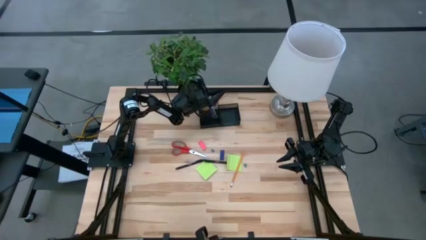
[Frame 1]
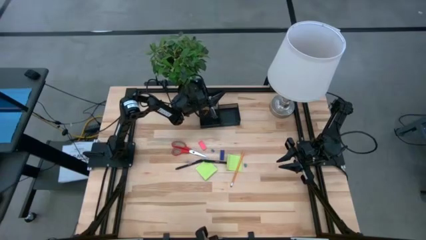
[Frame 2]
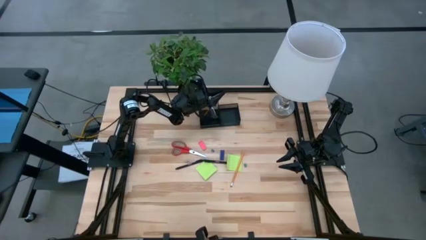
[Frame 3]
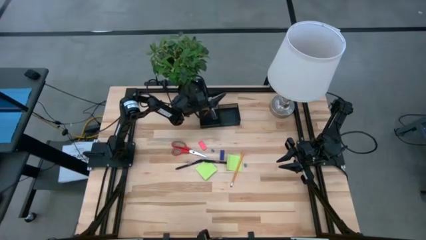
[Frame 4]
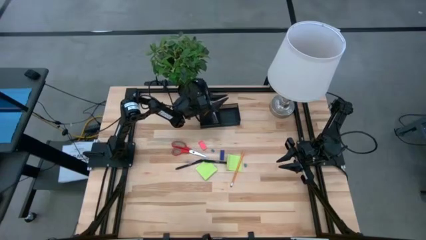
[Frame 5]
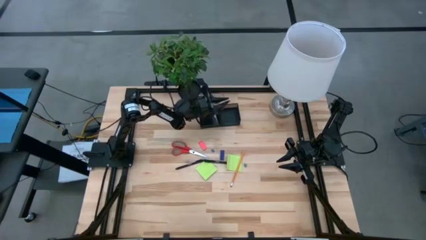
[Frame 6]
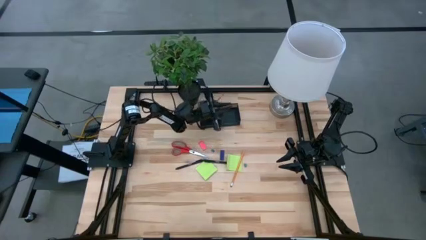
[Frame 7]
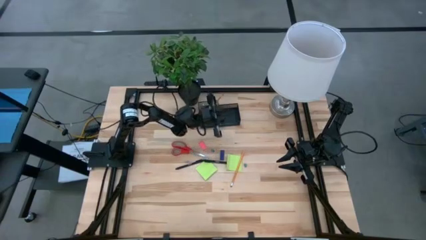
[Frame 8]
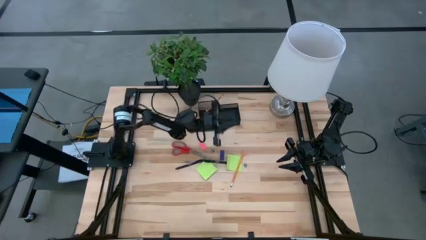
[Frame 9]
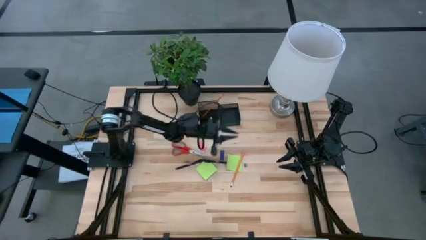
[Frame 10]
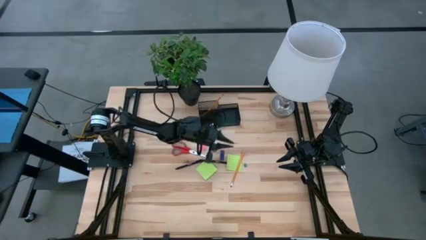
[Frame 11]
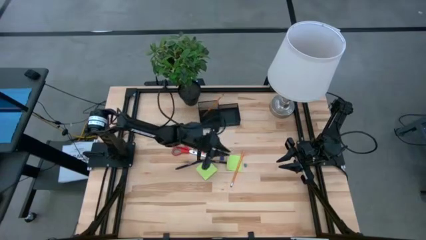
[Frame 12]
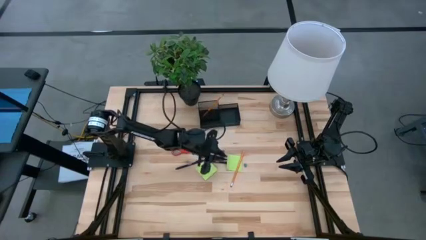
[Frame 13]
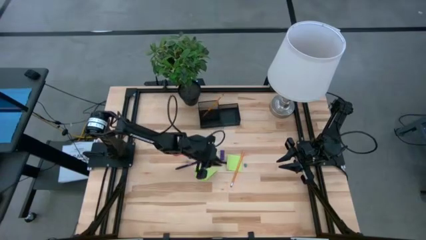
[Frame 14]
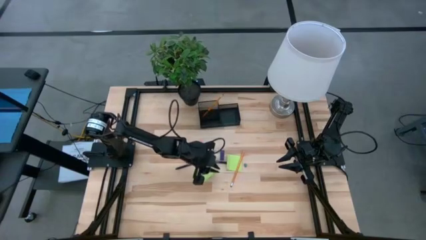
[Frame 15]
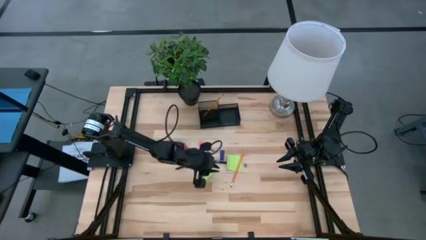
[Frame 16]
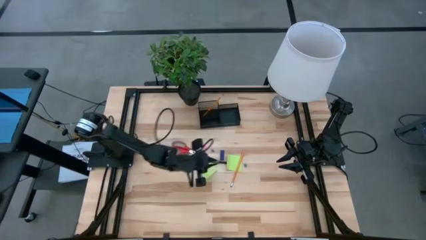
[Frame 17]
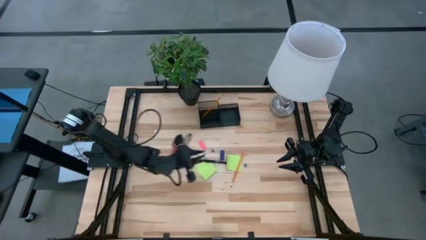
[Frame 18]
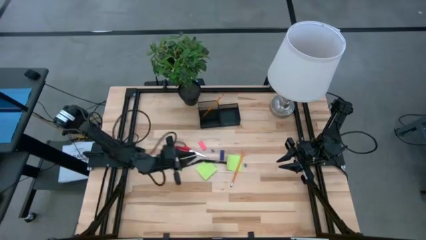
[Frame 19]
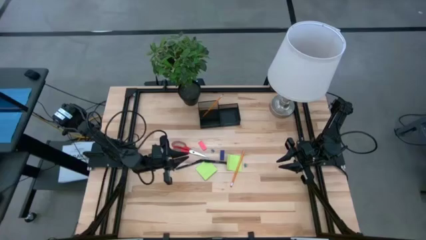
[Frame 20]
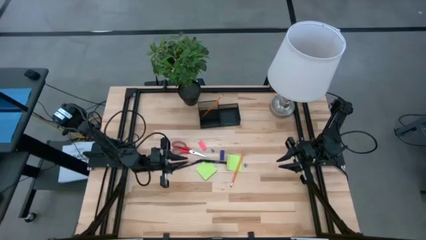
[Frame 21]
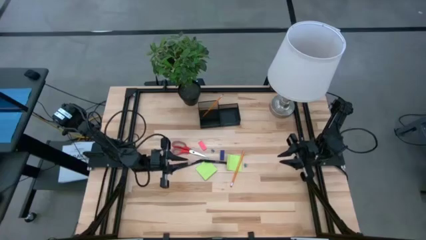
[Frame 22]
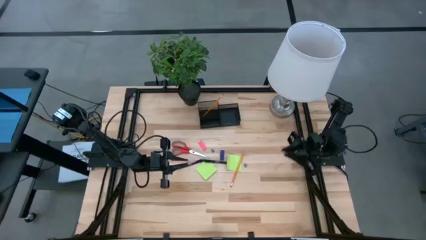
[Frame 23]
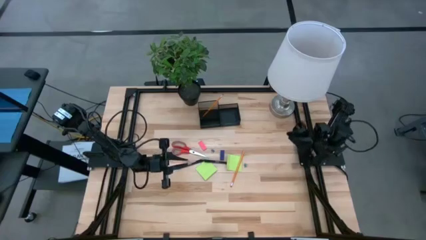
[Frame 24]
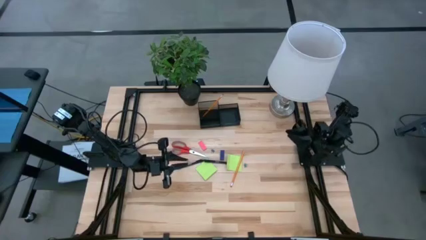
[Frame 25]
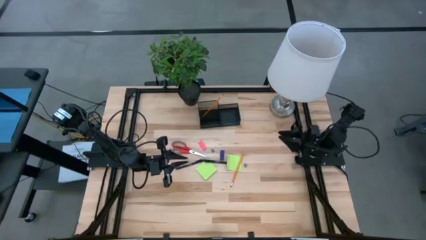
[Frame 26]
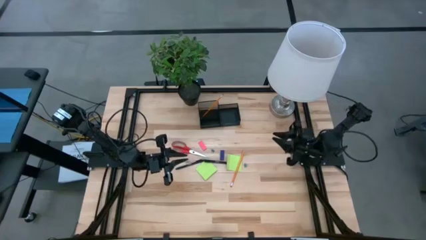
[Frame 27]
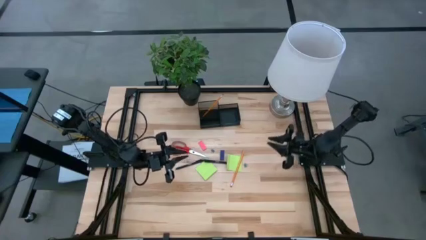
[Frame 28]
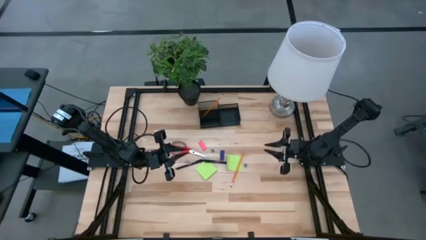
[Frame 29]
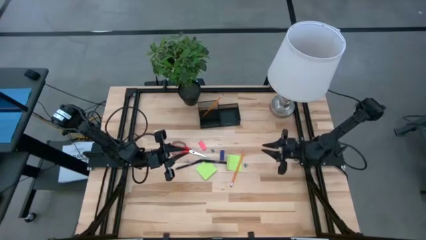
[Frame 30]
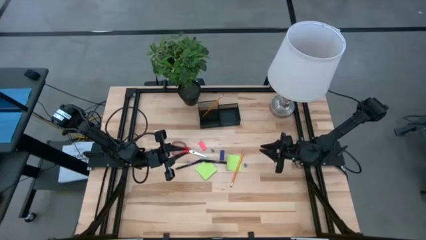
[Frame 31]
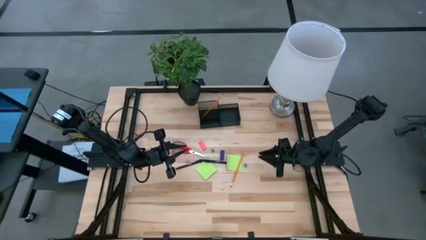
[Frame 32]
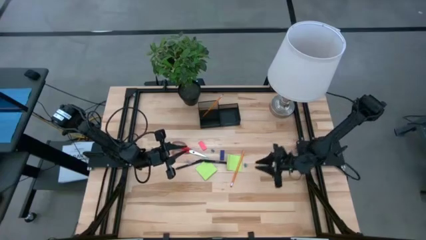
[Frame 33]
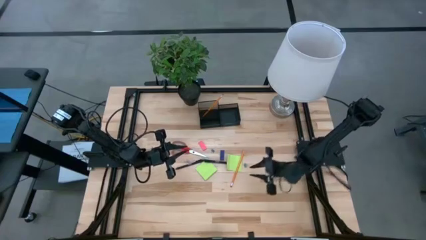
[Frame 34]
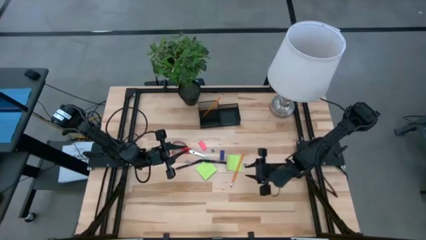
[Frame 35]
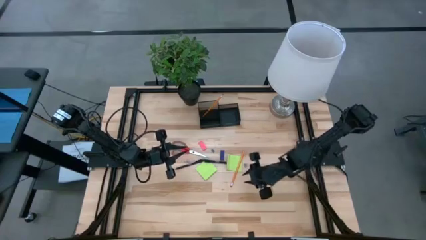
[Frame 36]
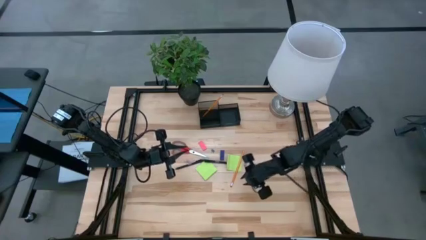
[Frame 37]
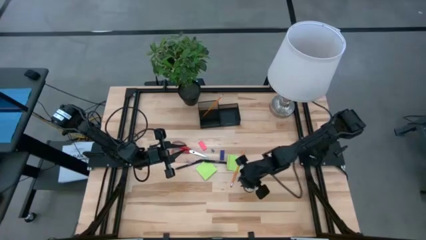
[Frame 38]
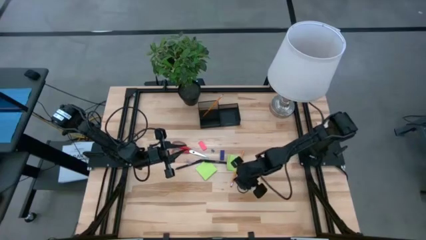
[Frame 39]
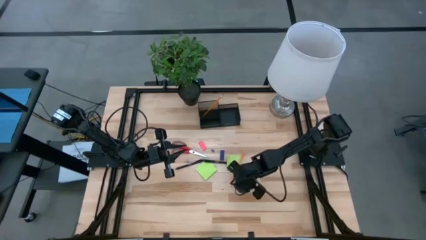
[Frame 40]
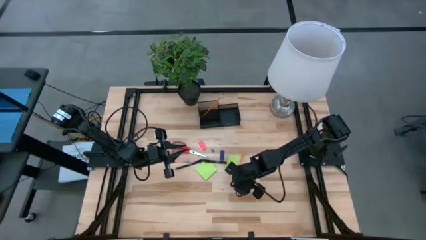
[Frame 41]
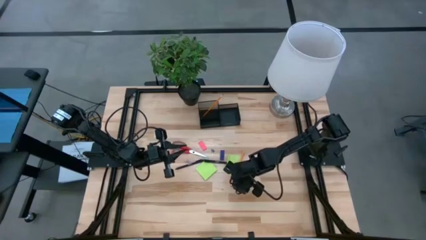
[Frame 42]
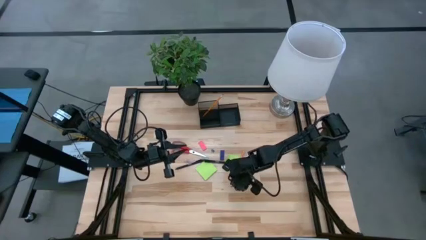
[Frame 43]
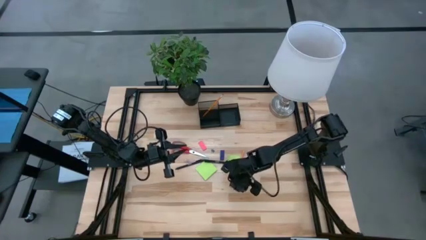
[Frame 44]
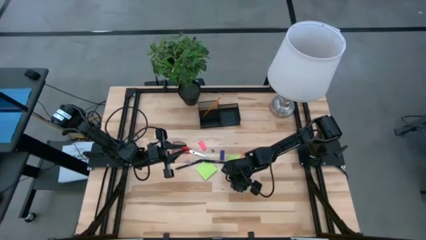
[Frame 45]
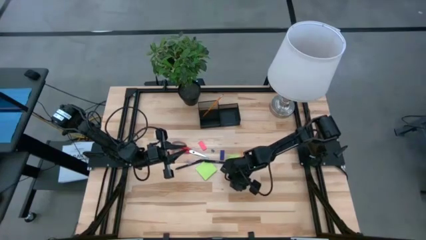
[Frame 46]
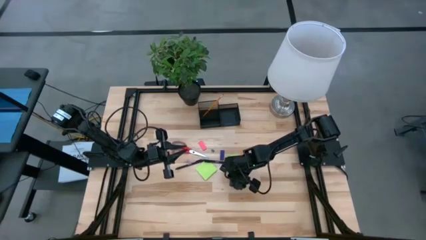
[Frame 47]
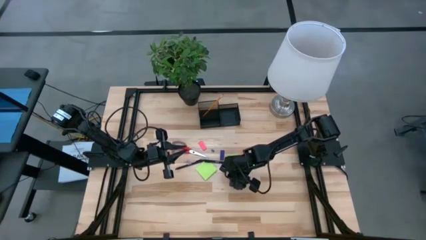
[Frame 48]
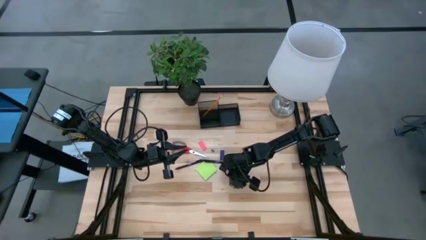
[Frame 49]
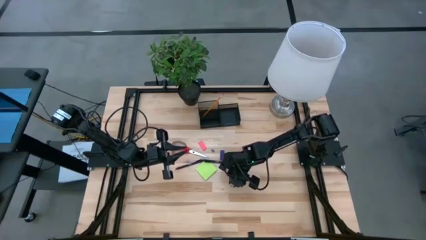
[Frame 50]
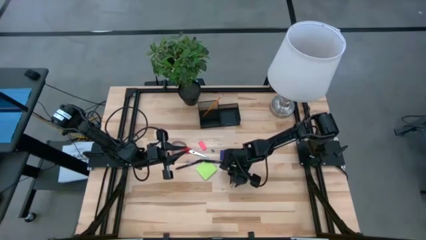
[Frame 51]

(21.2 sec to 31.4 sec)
Task: Pick and place office supplies into organizer
Put the orange pencil into the desk organizer
